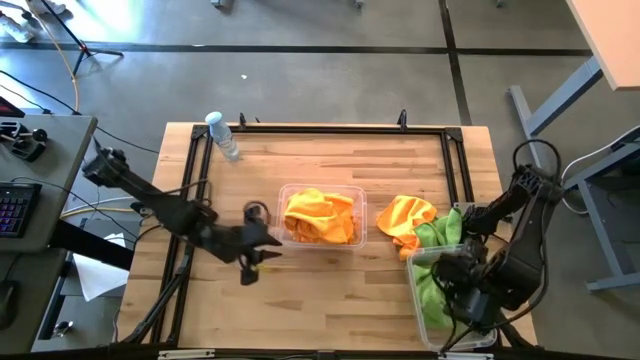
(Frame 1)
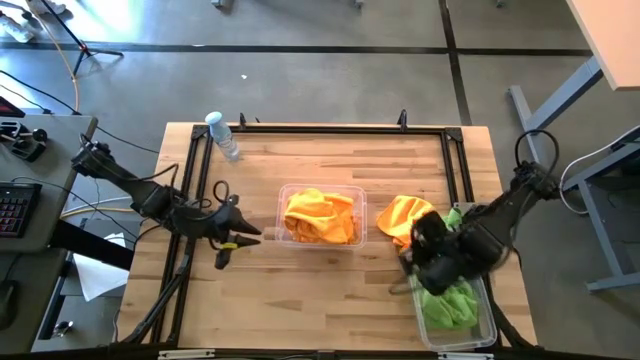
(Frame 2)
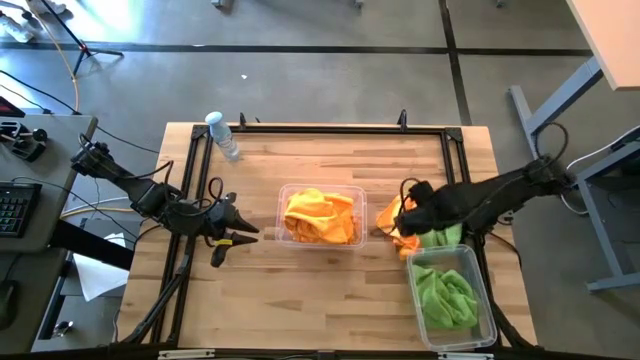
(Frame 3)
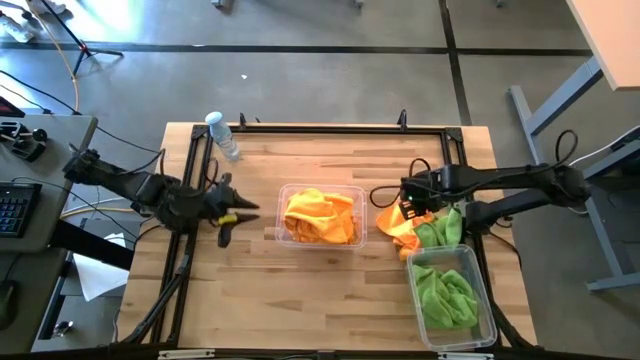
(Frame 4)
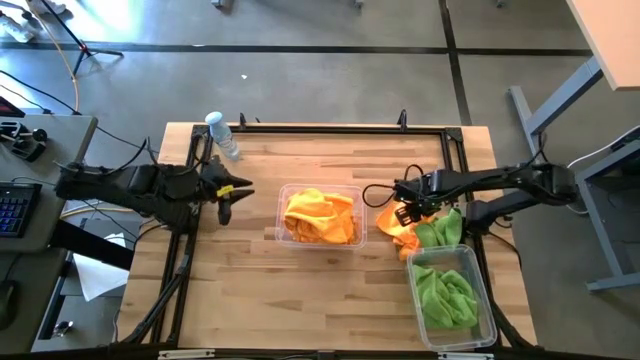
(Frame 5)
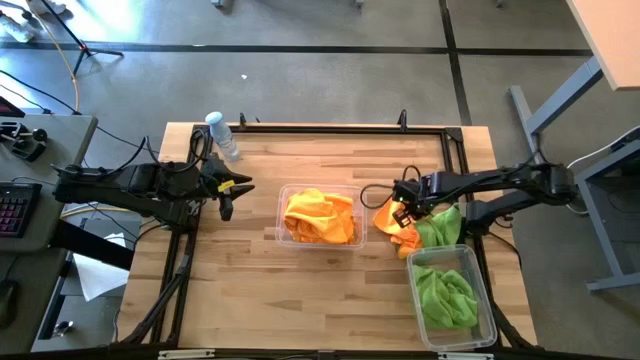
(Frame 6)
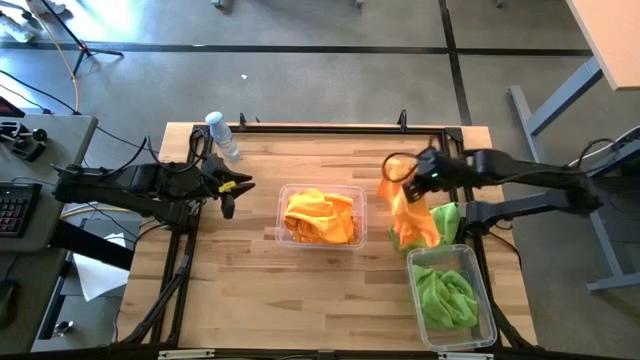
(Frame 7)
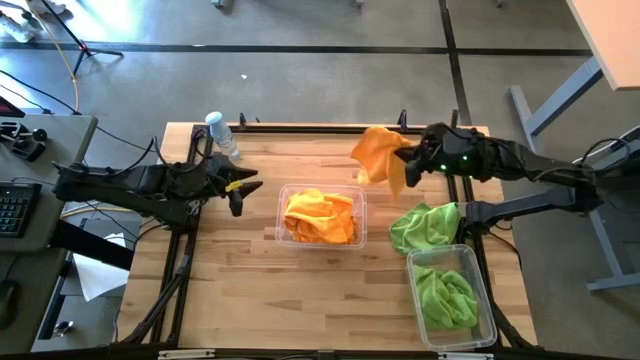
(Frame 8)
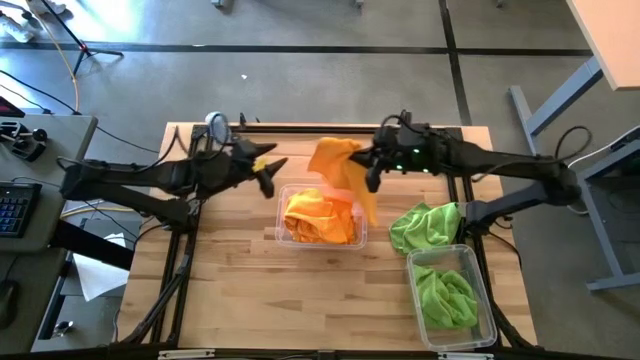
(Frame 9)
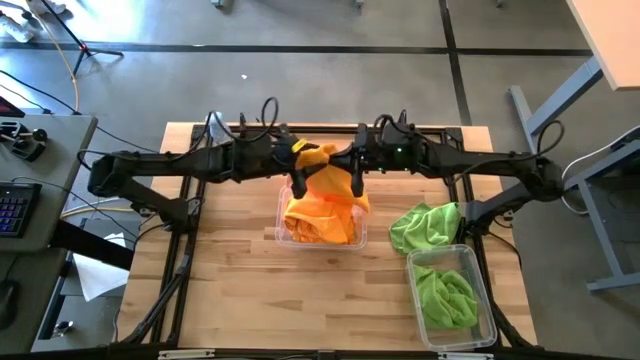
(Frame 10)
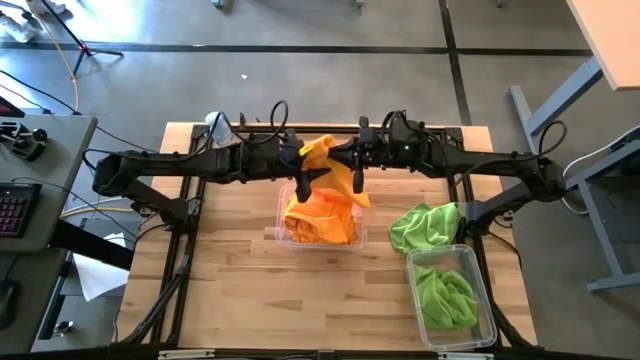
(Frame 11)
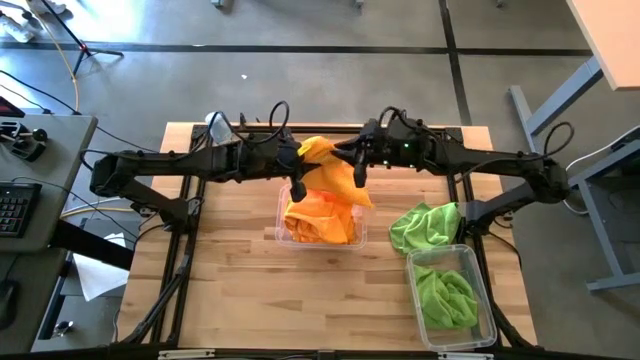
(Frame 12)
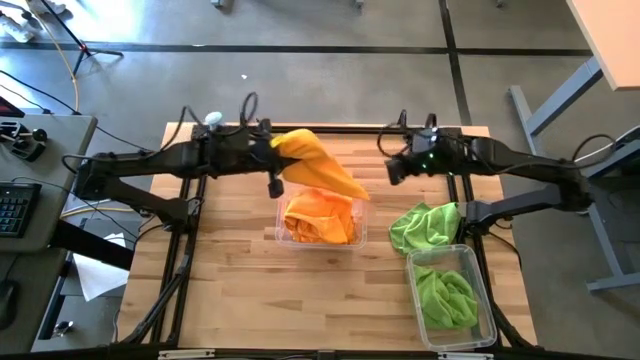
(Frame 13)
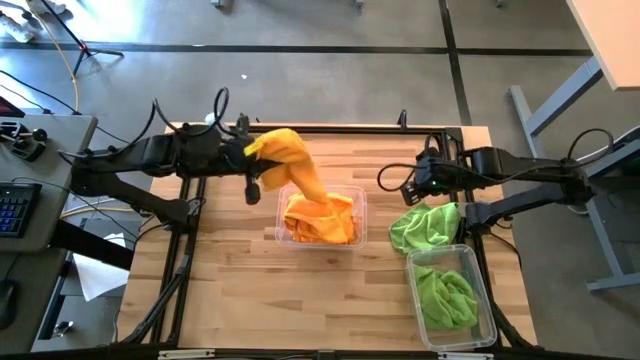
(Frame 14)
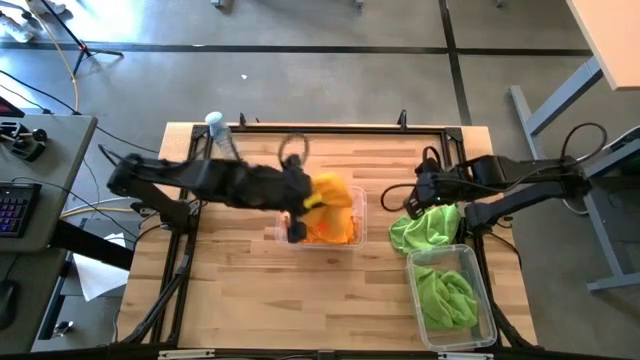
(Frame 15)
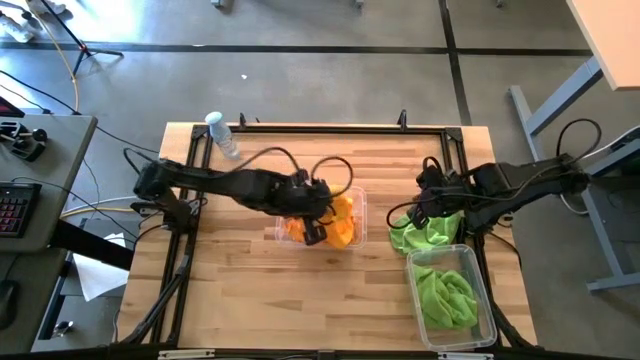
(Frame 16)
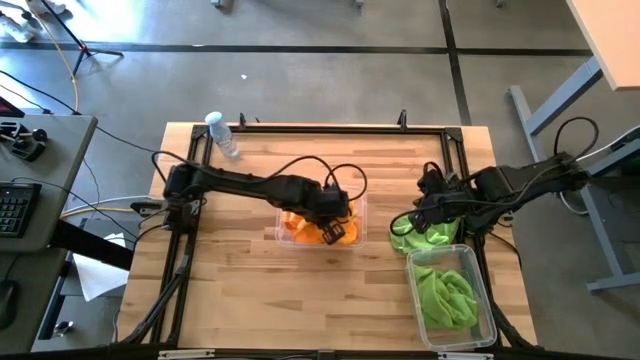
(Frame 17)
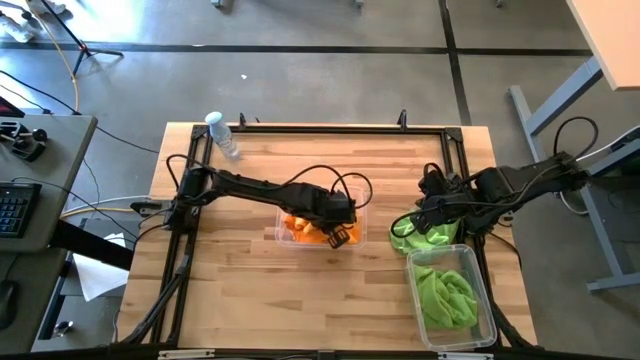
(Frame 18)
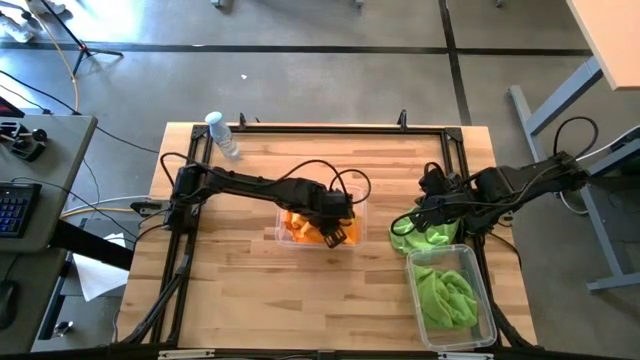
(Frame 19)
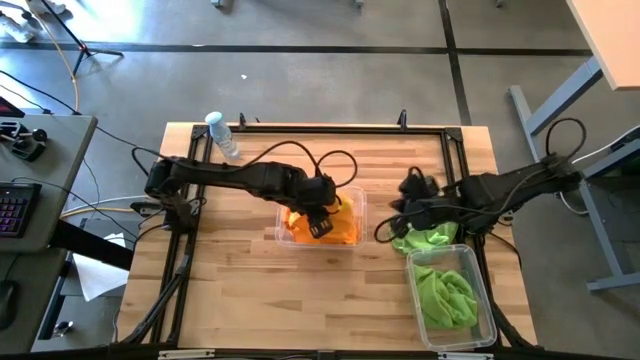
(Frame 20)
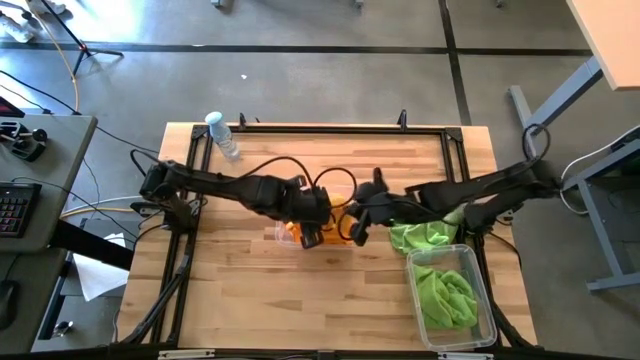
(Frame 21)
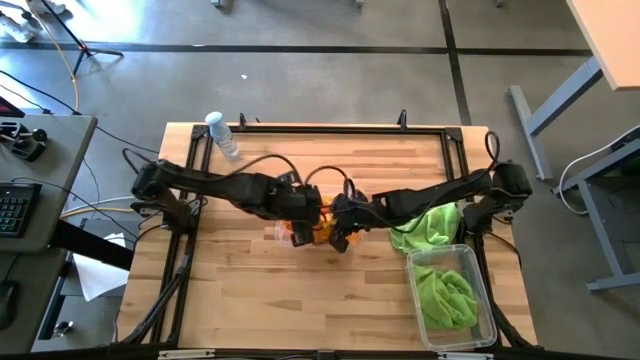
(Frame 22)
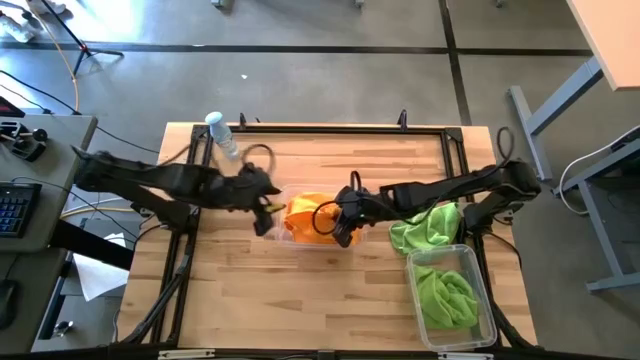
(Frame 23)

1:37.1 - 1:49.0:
Task: Sort microfiber towel by color & place in baskets
Put the orange towel into the bottom transparent bin

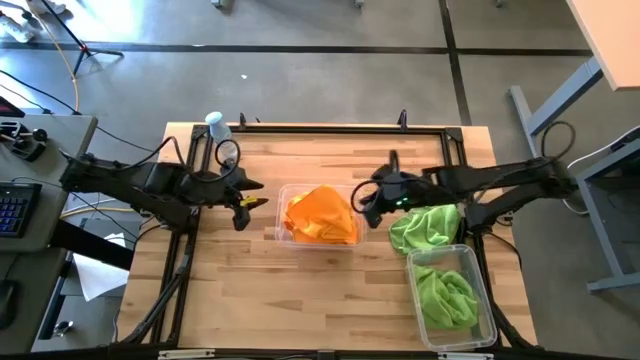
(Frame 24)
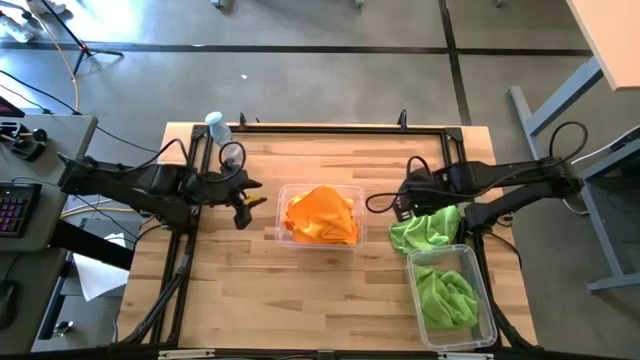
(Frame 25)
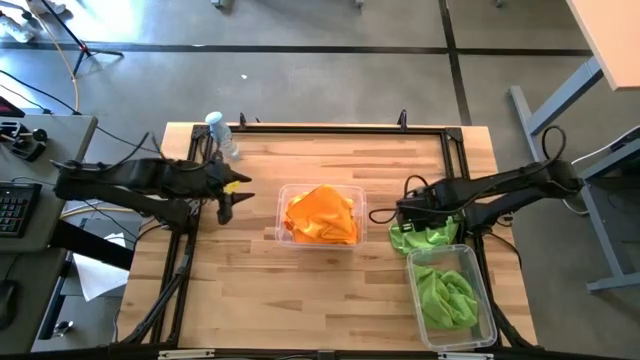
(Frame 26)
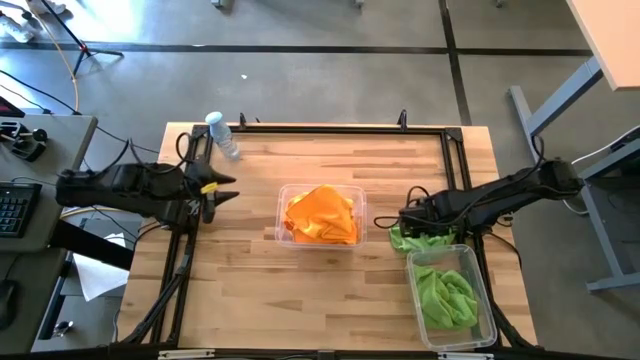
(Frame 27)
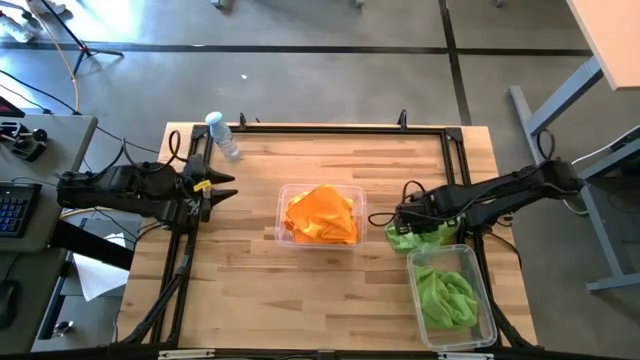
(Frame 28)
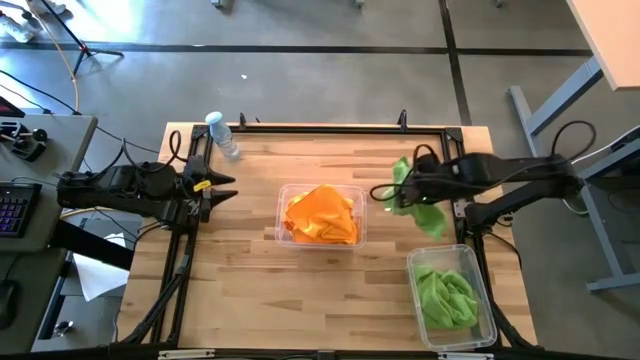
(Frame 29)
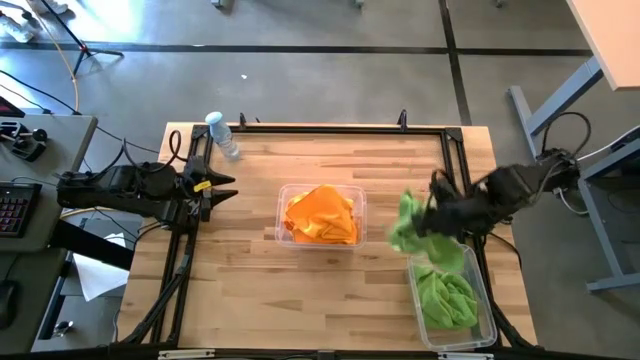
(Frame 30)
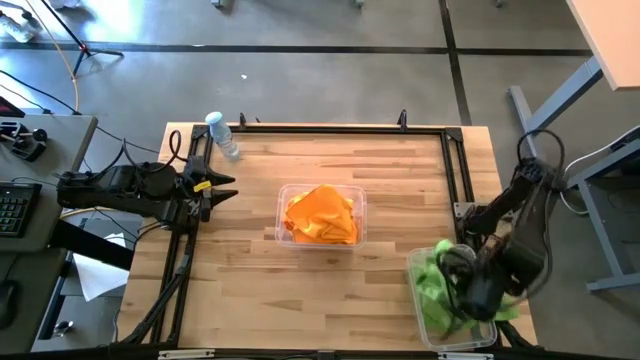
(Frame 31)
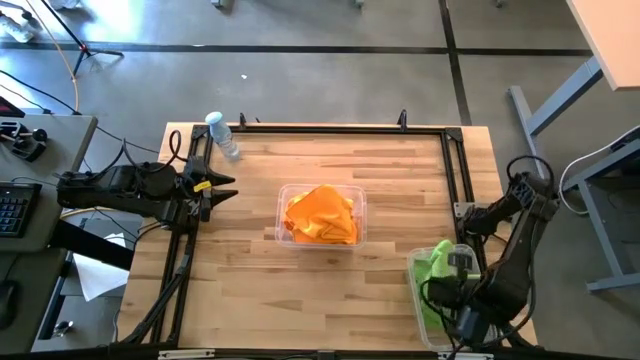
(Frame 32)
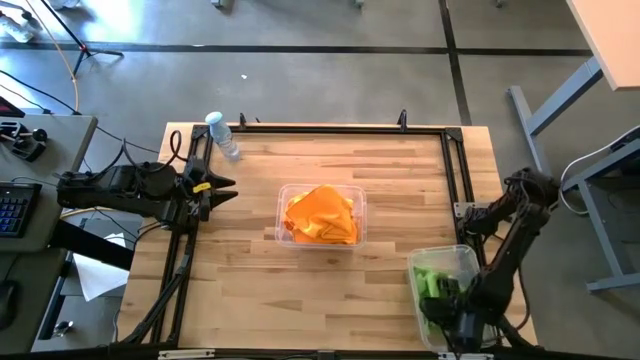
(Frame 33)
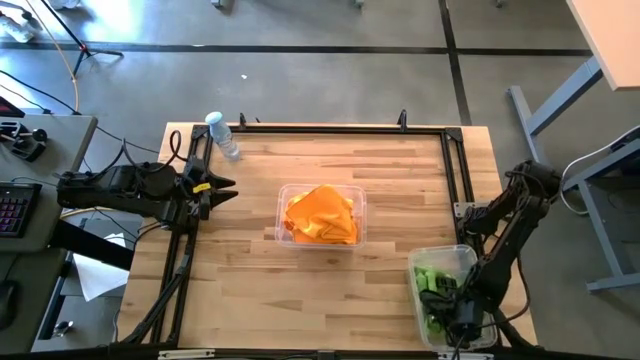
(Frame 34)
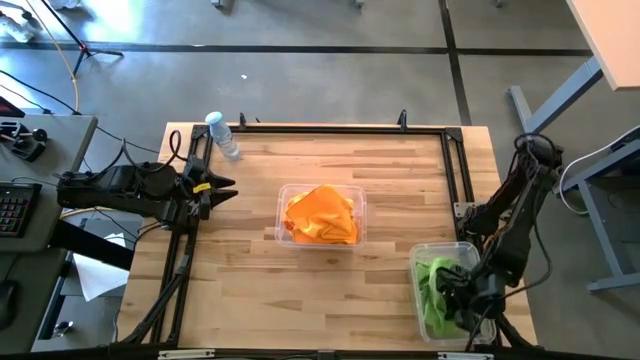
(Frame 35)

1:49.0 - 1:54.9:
Put the green towel into the bottom transparent bin

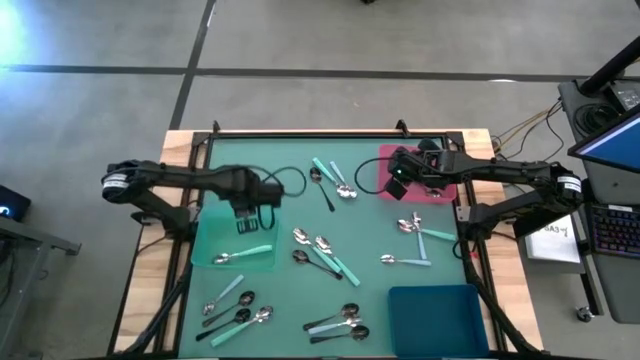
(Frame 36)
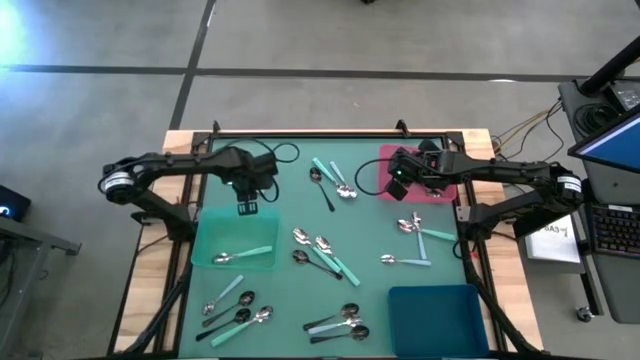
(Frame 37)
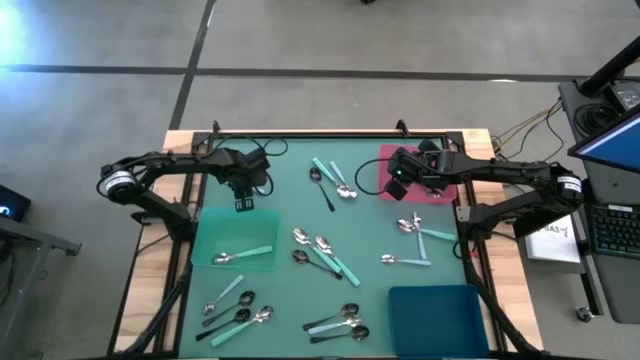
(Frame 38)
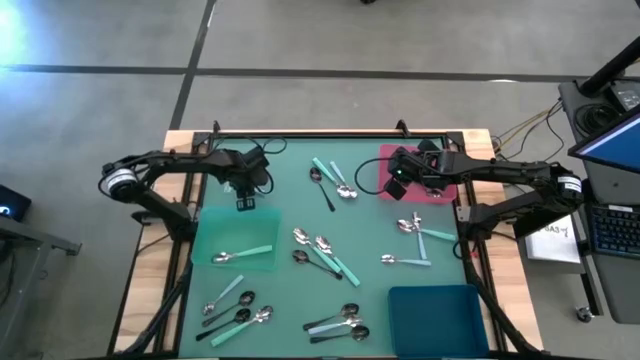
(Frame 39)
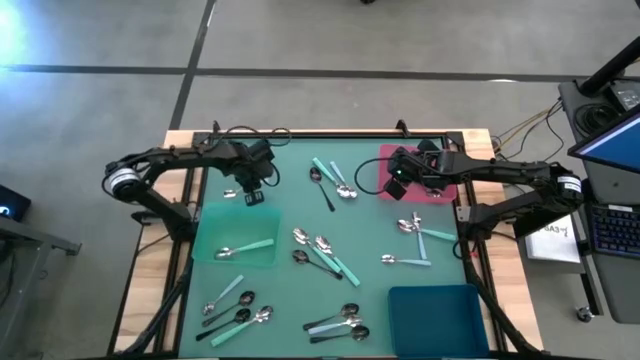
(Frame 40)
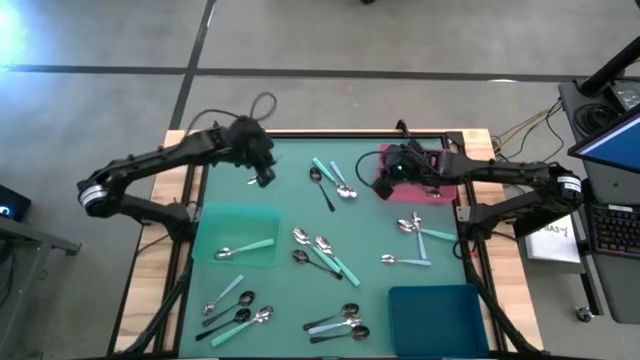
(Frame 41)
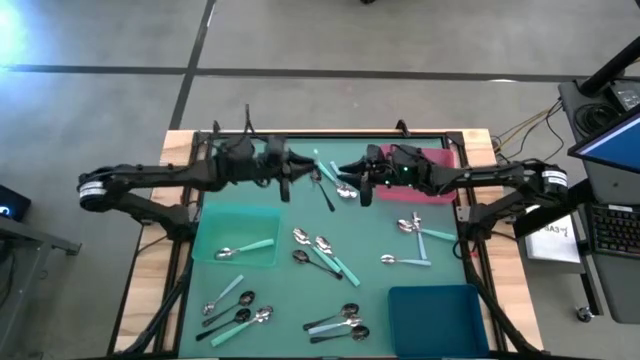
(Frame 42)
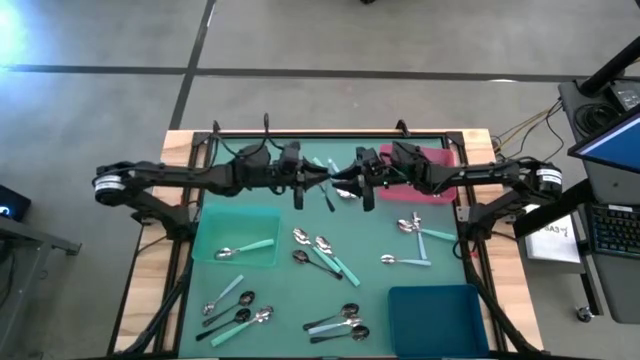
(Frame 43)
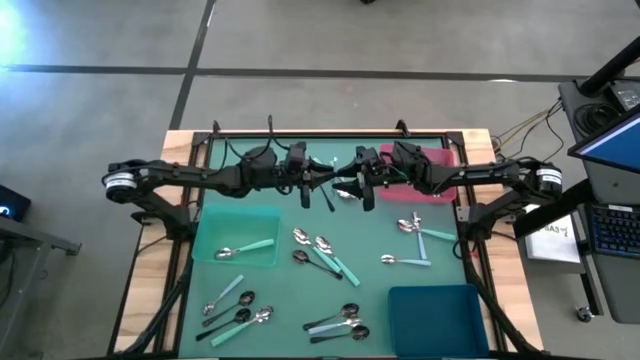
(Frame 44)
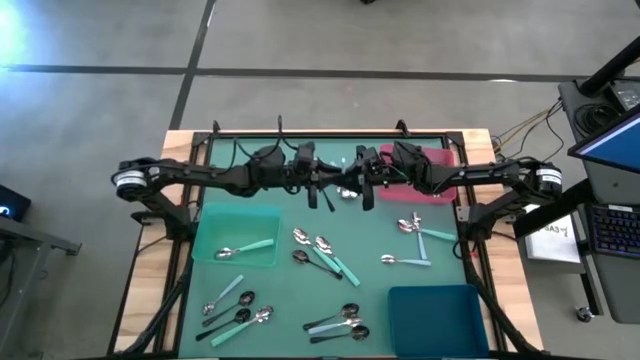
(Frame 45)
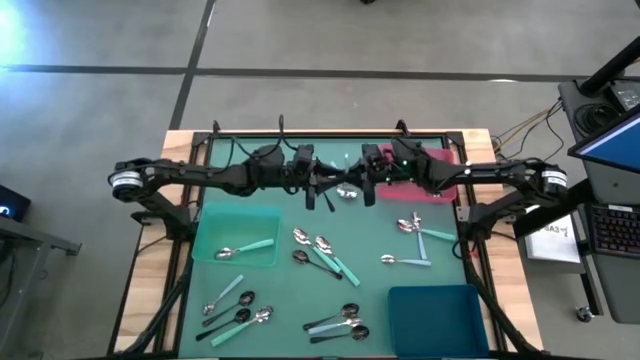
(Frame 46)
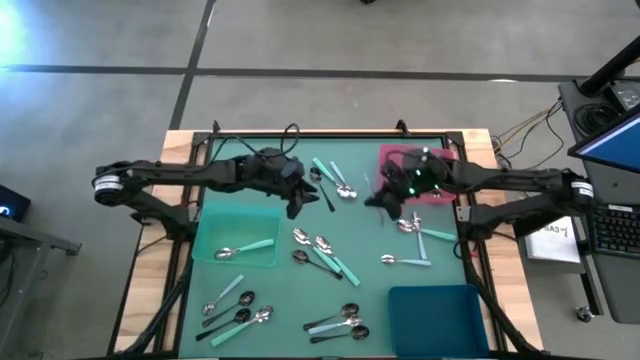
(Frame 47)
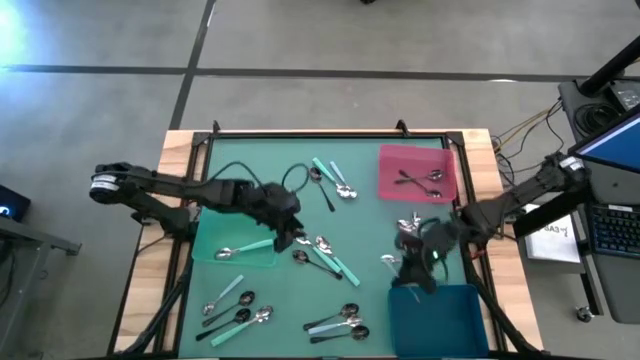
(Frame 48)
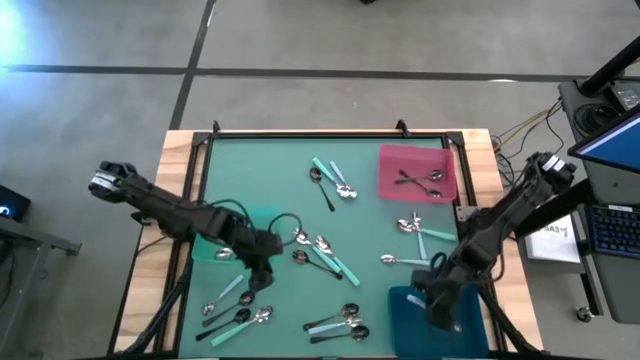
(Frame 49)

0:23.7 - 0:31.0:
Task: Sort silverware by color (type)
Put the blue spoon into the blue bin
